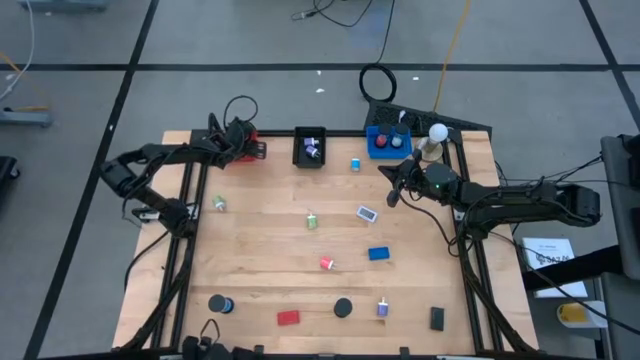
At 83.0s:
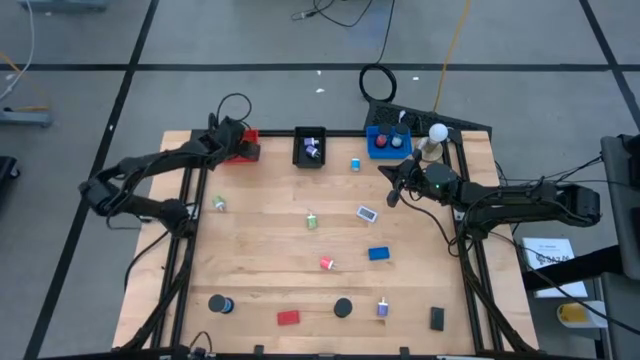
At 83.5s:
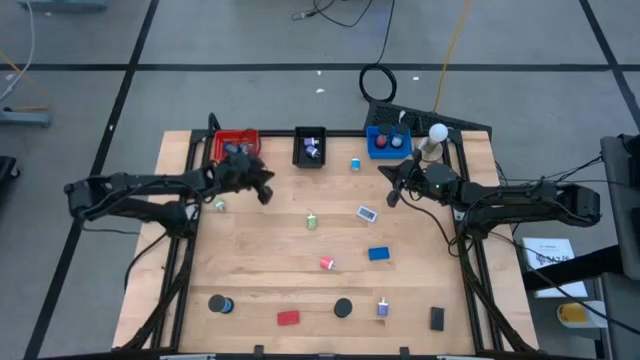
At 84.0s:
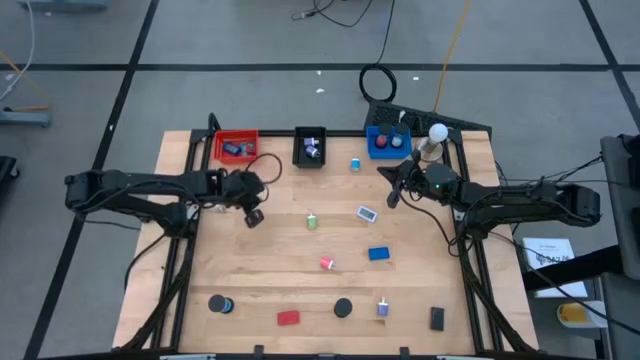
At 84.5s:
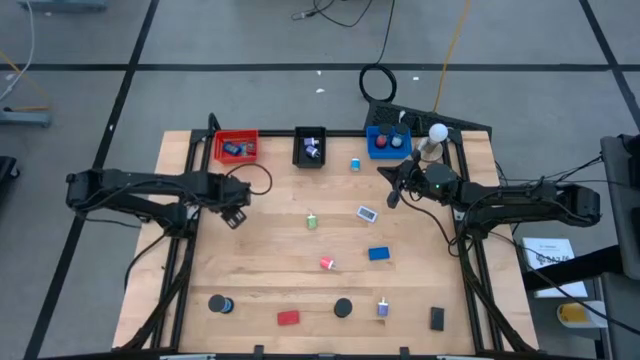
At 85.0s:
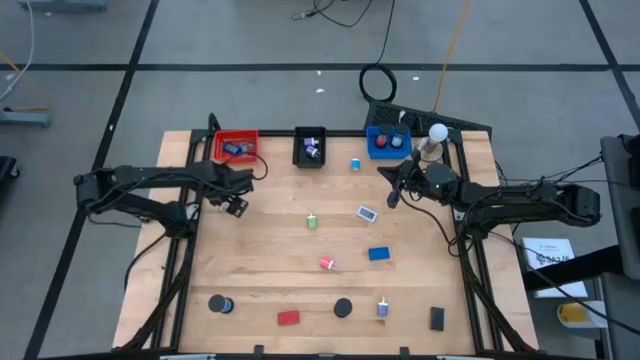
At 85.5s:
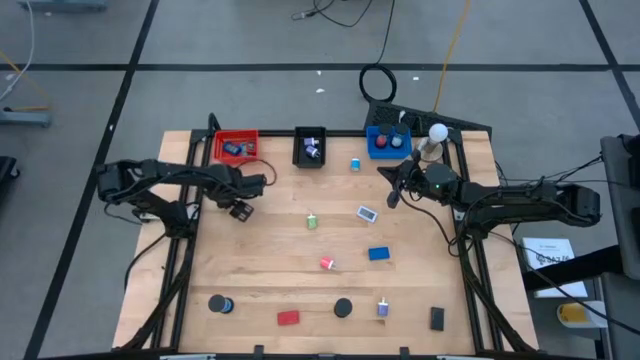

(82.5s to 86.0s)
Task: Pick & Place Office items
Put the left green charger adapter head into the black bin

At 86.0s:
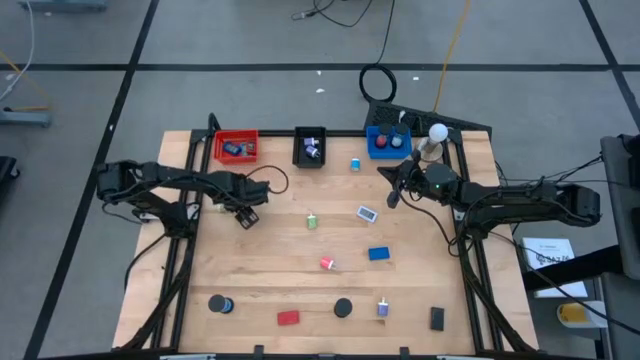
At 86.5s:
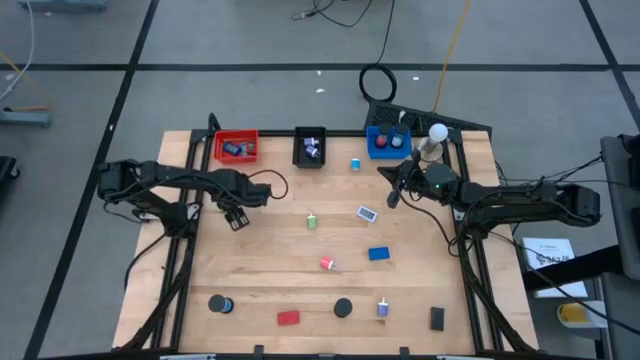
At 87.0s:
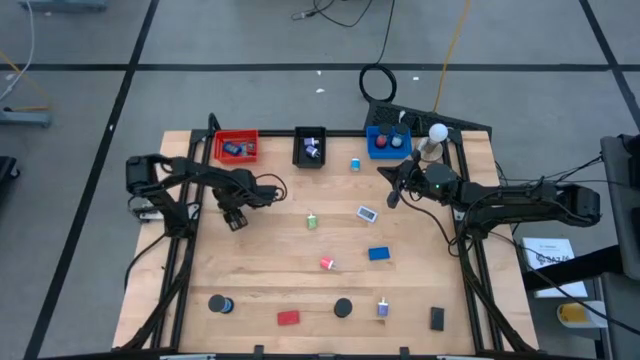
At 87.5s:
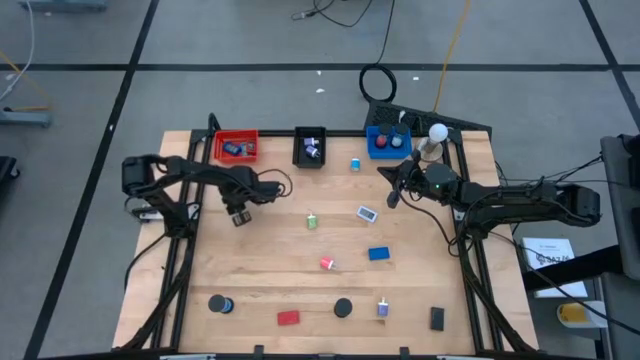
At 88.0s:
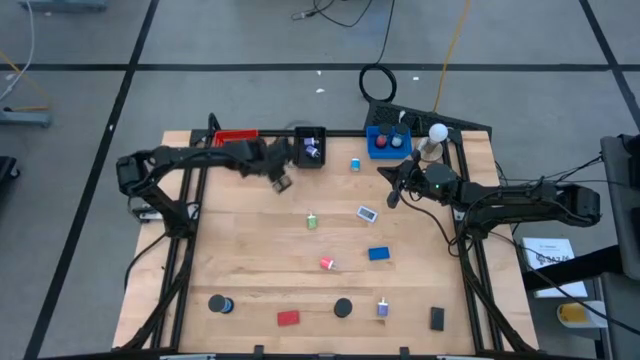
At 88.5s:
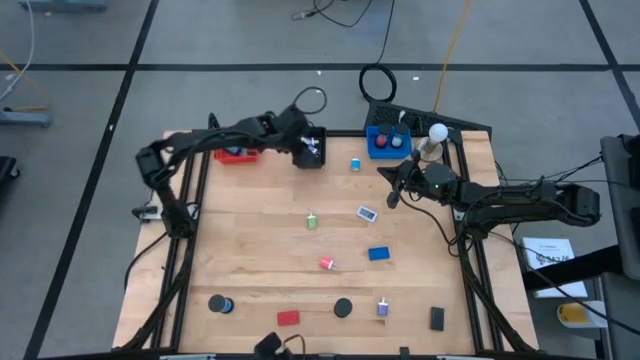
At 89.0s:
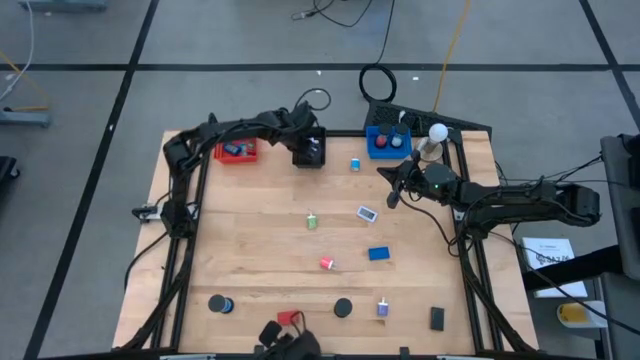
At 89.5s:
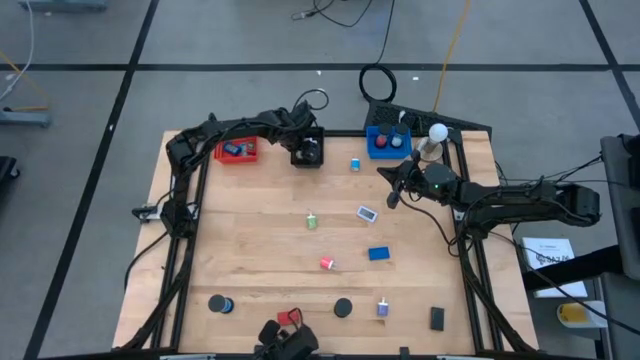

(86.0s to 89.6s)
Put the left green charger adapter head into the black bin

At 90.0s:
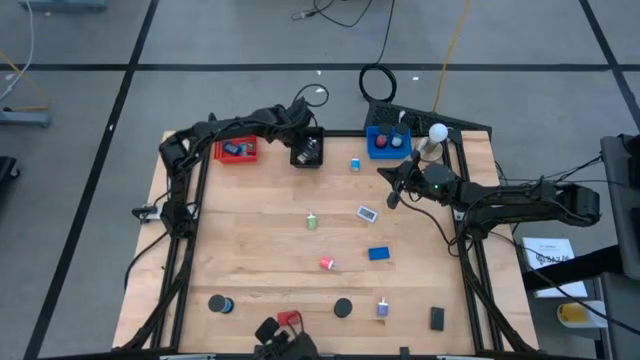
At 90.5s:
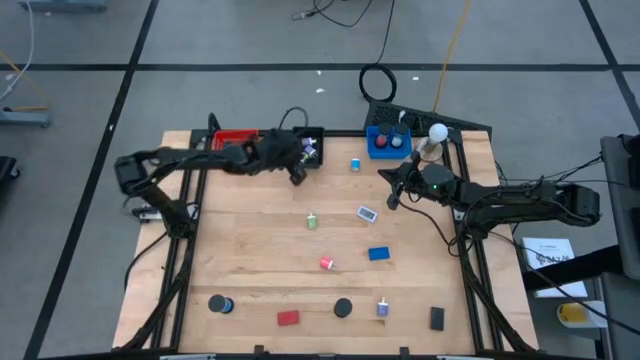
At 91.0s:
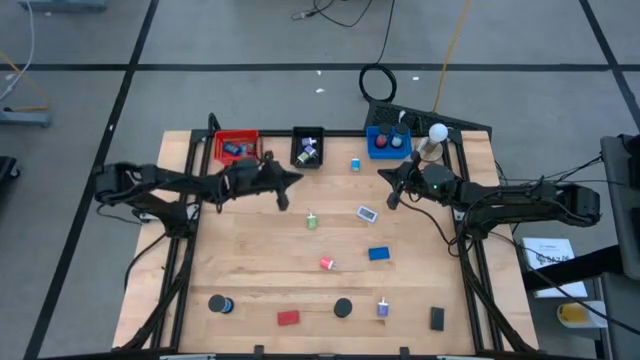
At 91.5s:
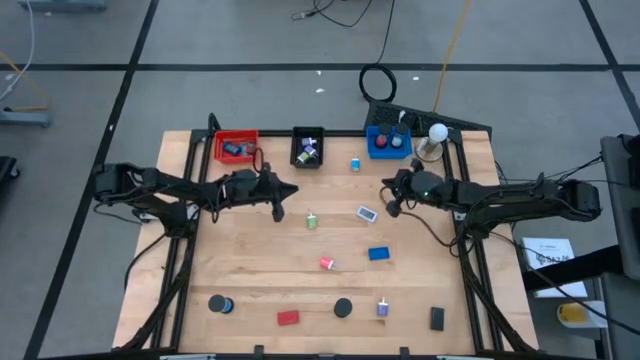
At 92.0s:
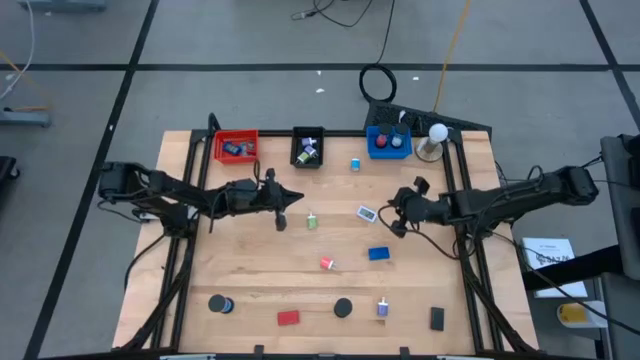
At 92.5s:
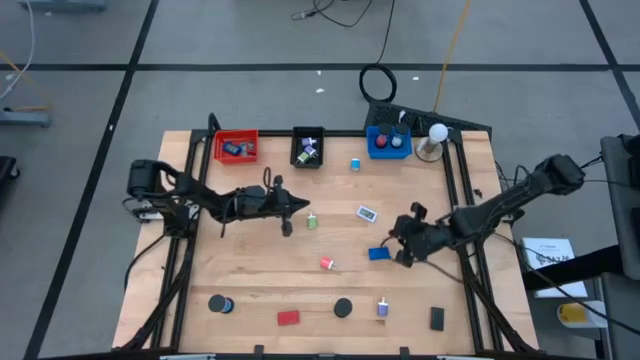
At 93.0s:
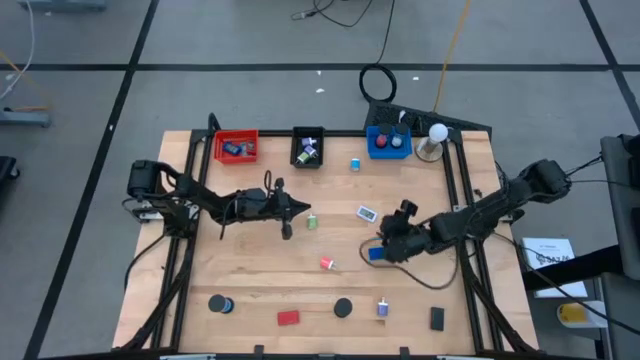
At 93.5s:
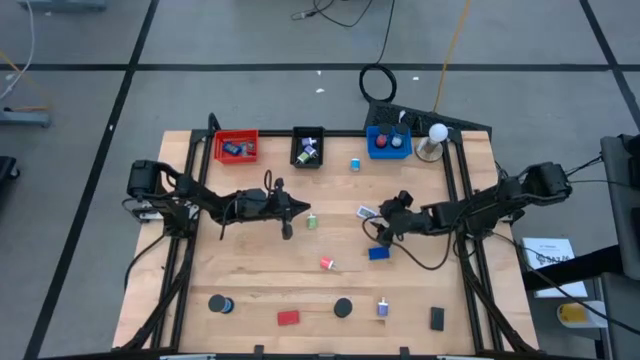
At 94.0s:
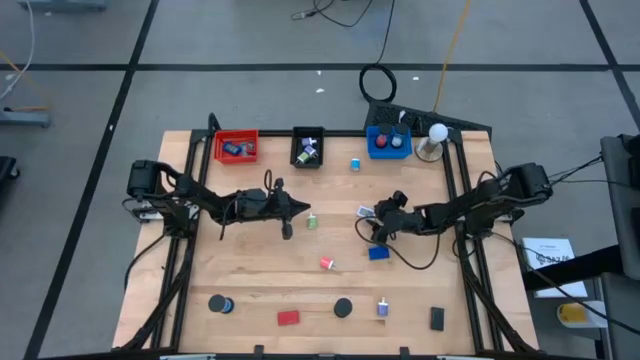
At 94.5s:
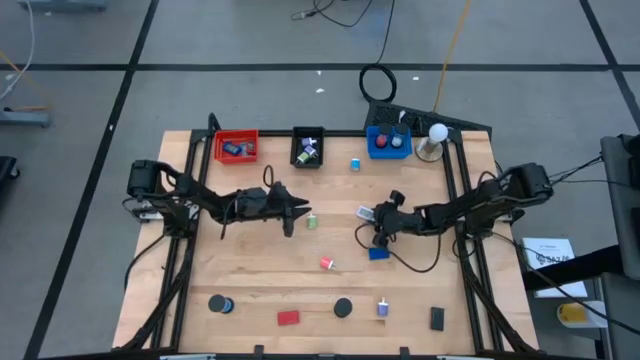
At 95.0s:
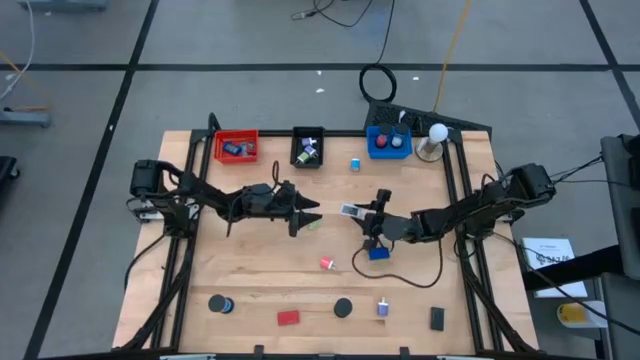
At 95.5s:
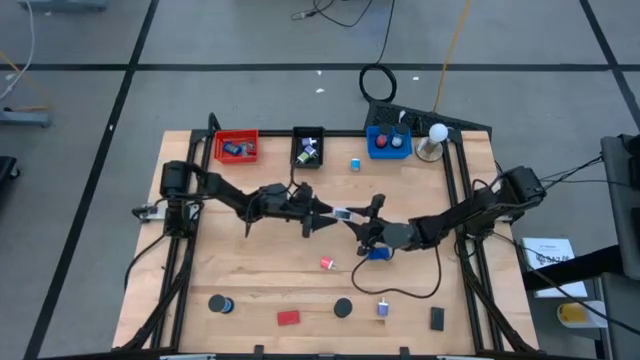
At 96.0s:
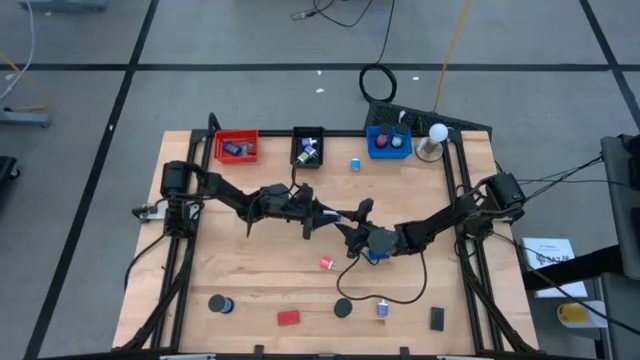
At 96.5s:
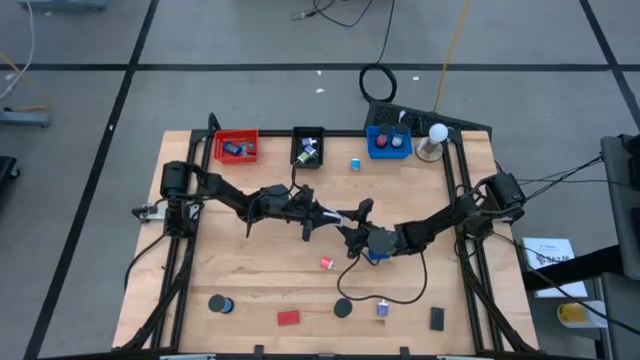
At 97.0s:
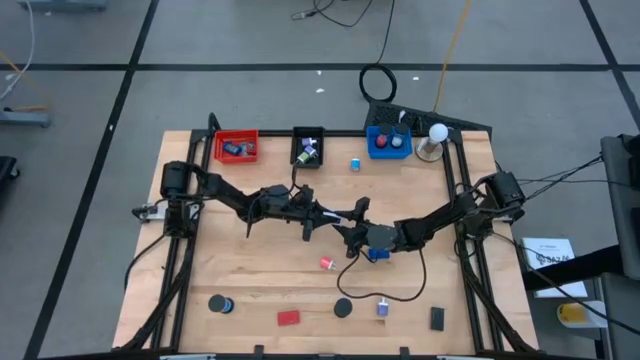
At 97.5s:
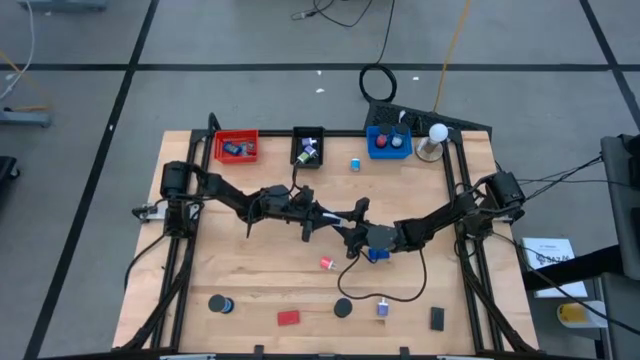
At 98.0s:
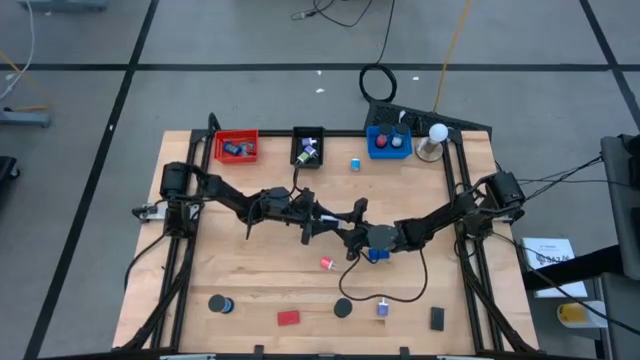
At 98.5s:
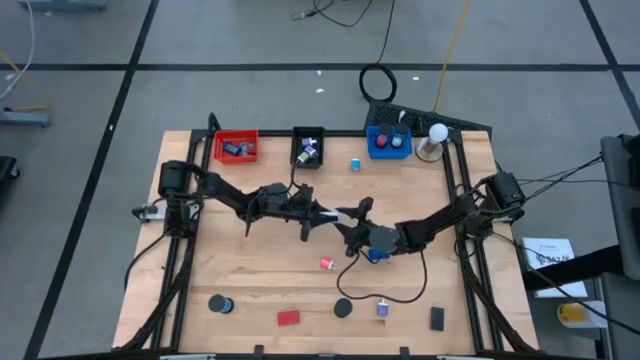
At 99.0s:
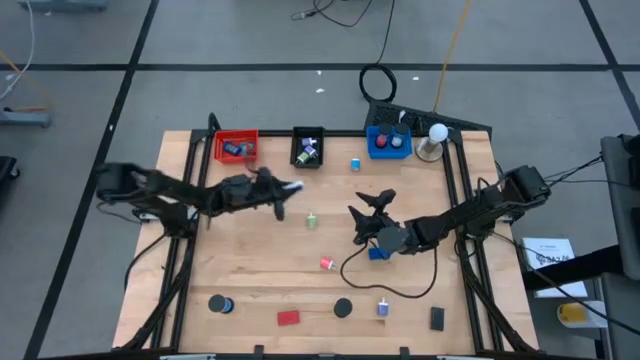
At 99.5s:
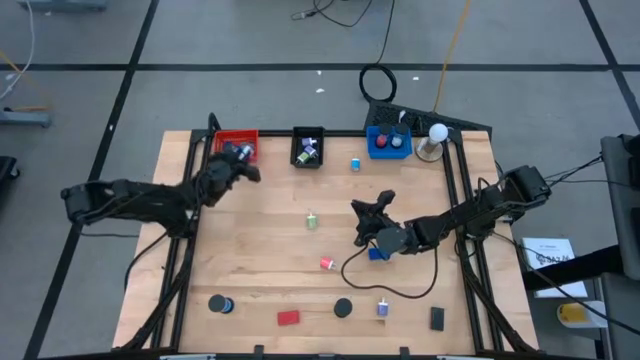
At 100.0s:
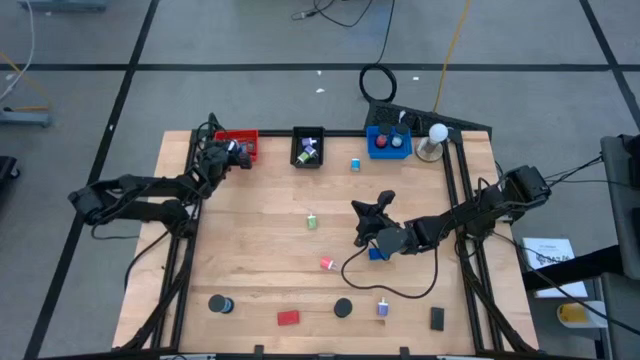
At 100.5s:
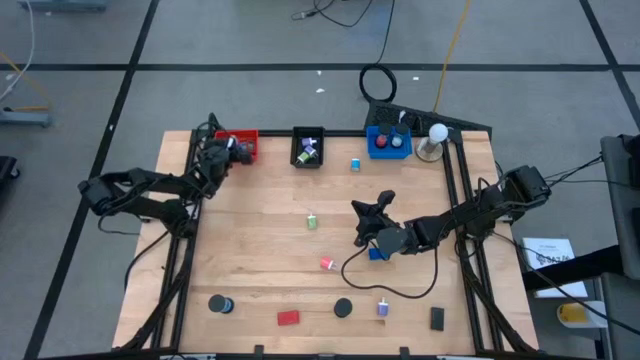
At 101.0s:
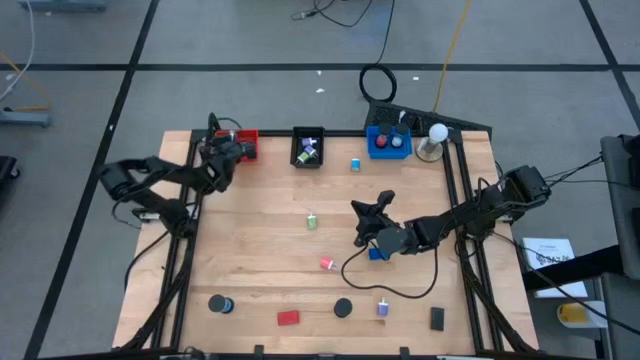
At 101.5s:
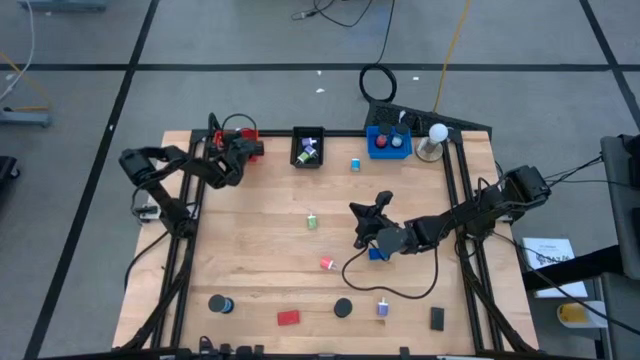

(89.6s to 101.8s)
Put the white digital clock into the red bin
